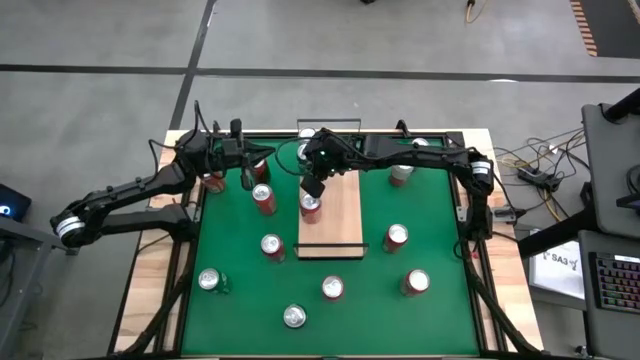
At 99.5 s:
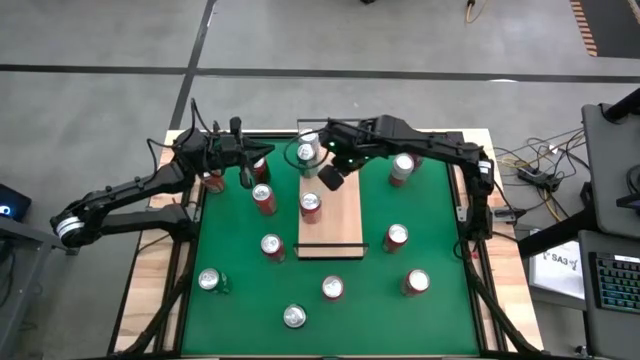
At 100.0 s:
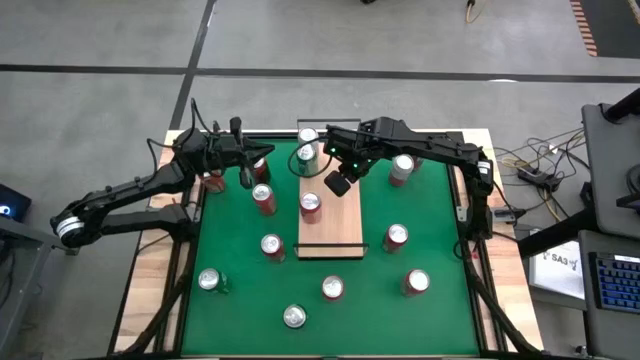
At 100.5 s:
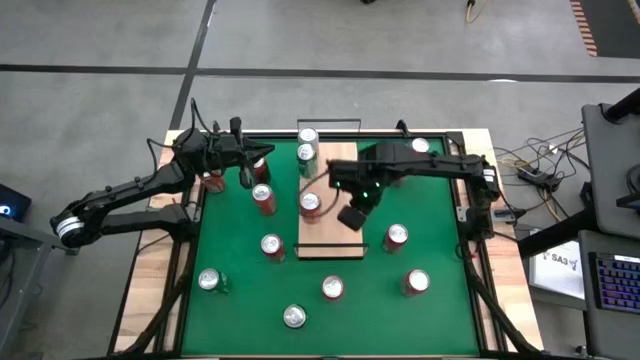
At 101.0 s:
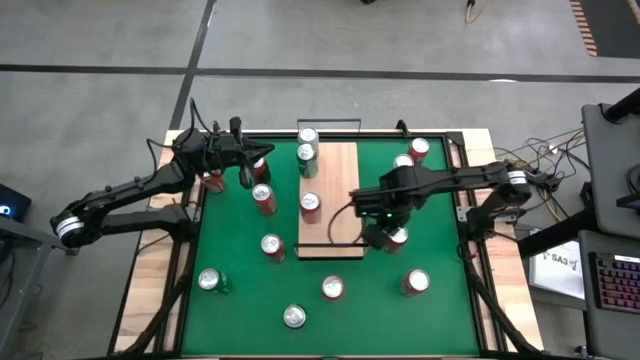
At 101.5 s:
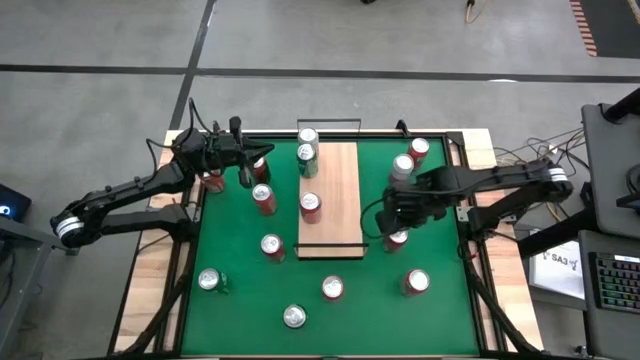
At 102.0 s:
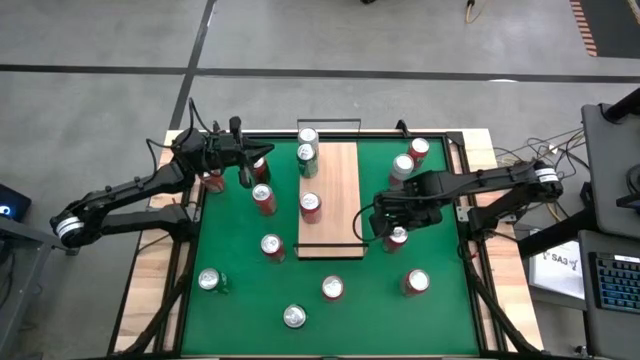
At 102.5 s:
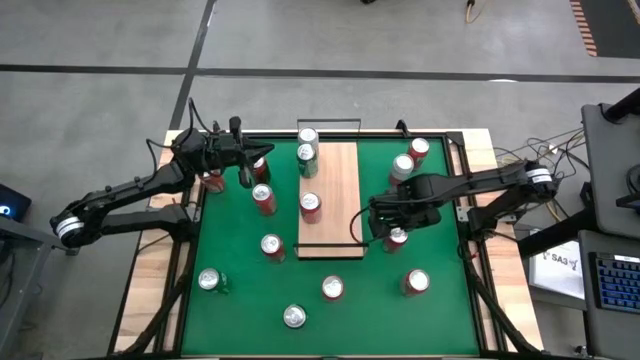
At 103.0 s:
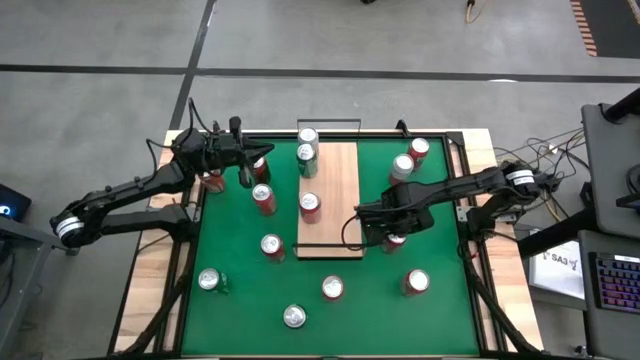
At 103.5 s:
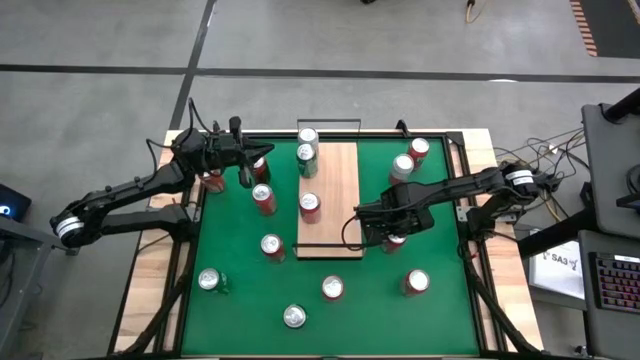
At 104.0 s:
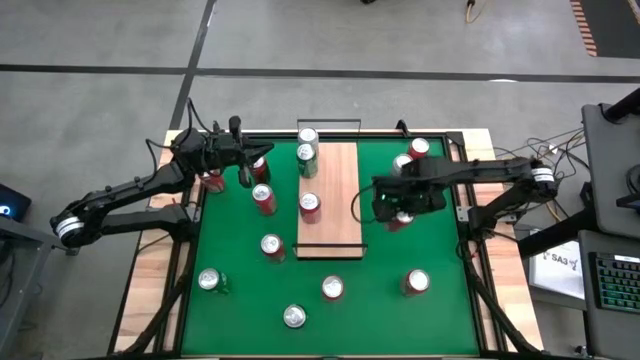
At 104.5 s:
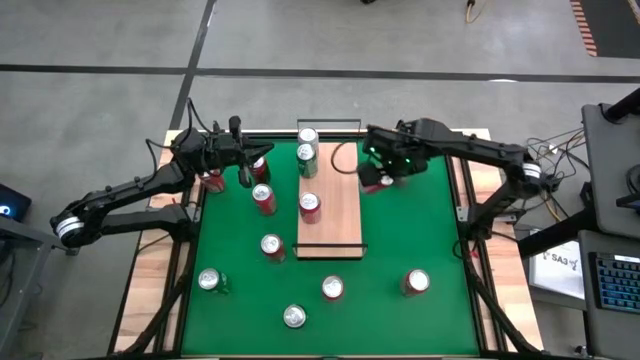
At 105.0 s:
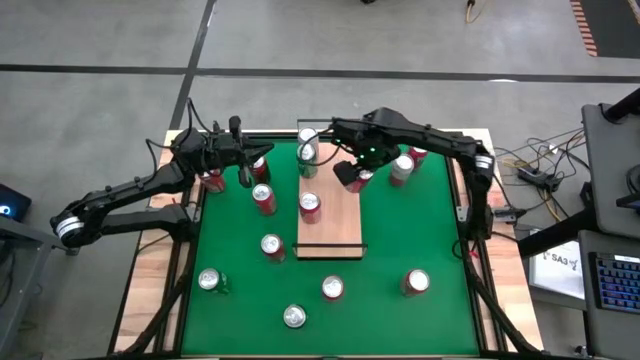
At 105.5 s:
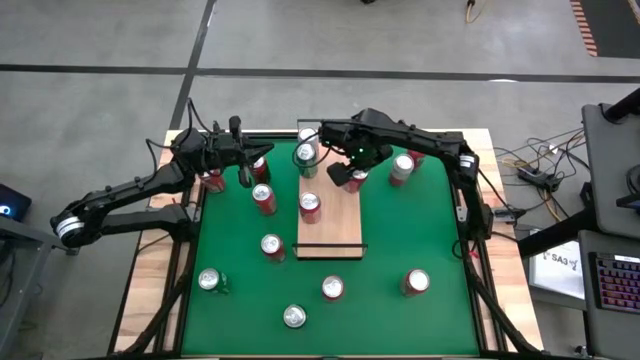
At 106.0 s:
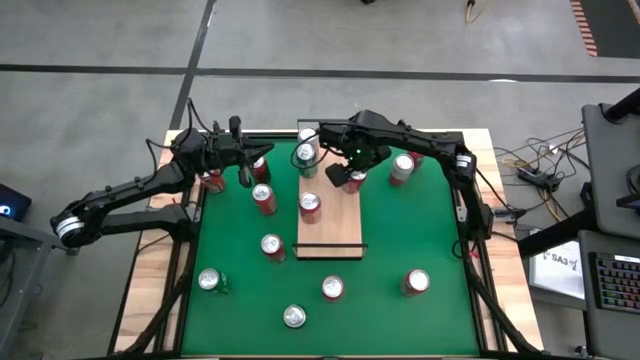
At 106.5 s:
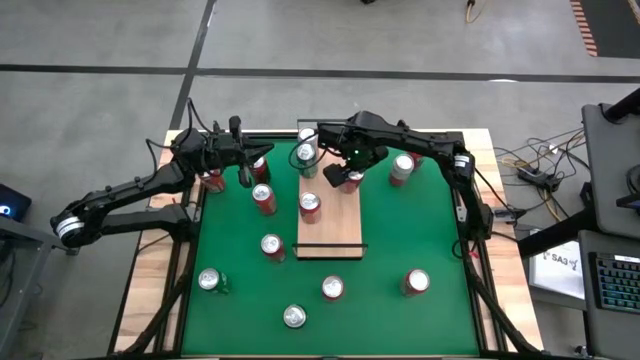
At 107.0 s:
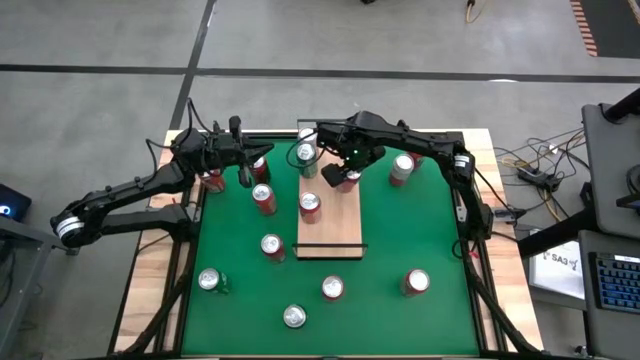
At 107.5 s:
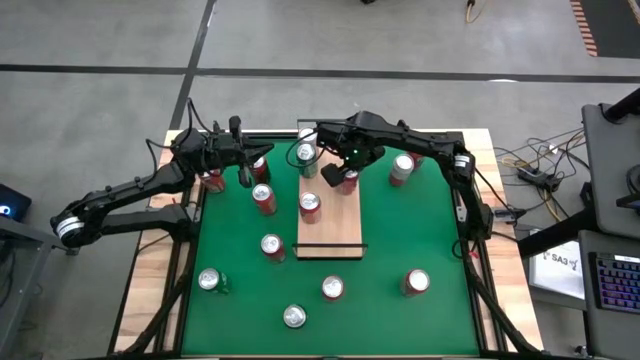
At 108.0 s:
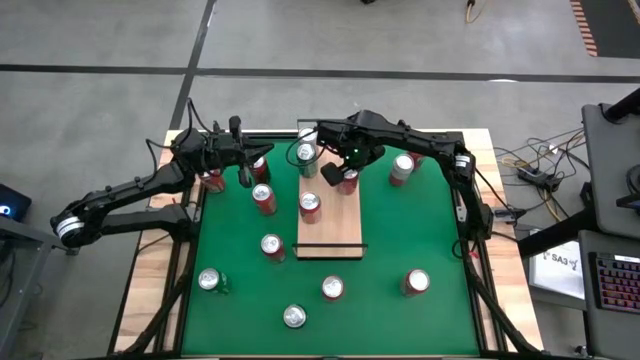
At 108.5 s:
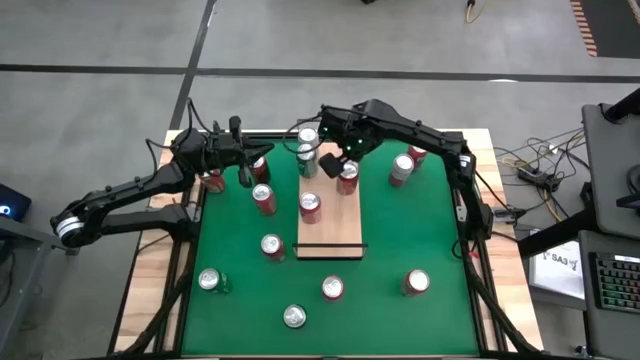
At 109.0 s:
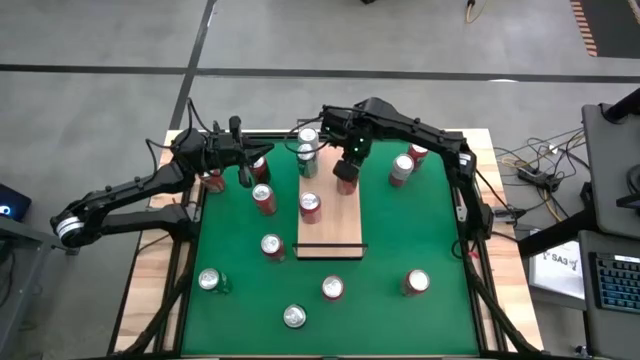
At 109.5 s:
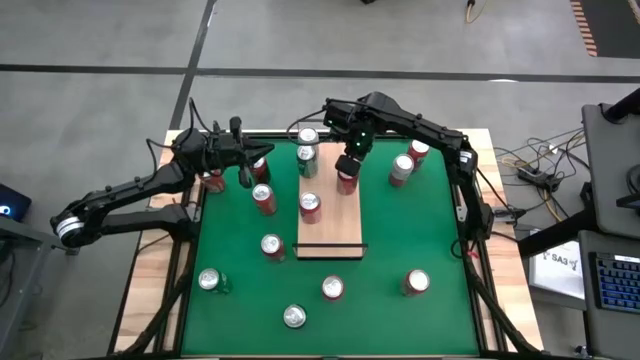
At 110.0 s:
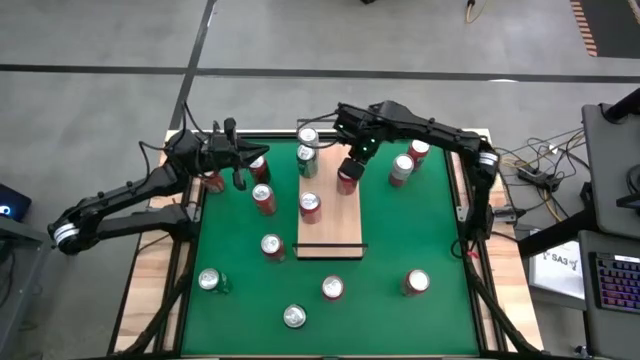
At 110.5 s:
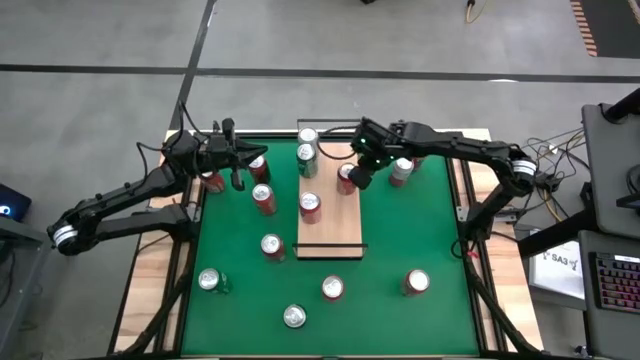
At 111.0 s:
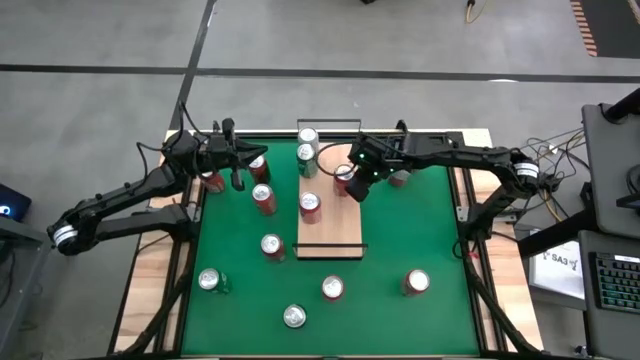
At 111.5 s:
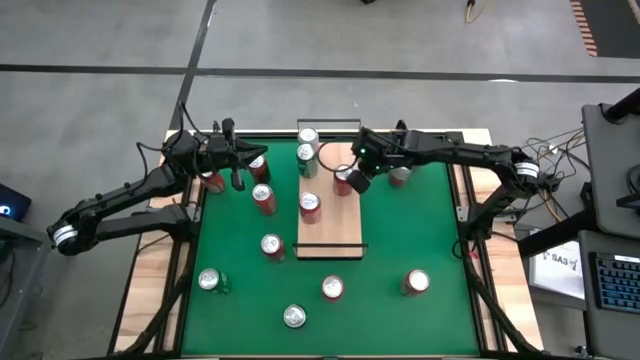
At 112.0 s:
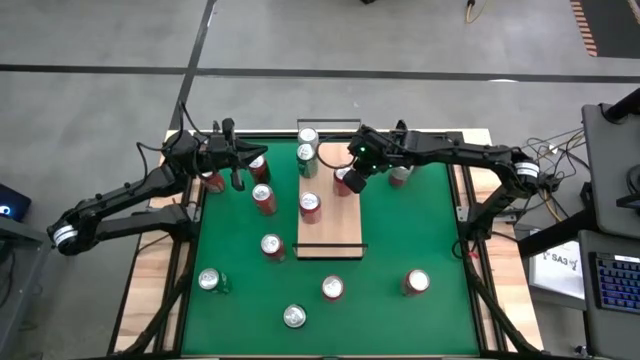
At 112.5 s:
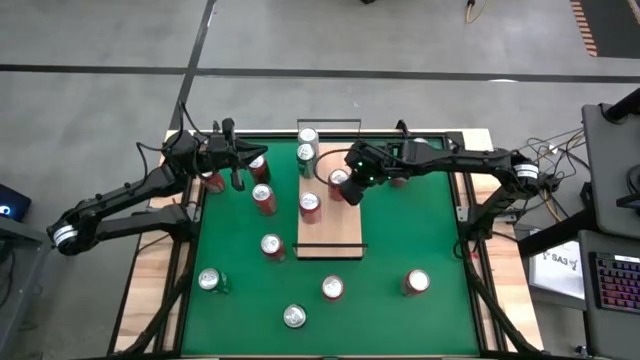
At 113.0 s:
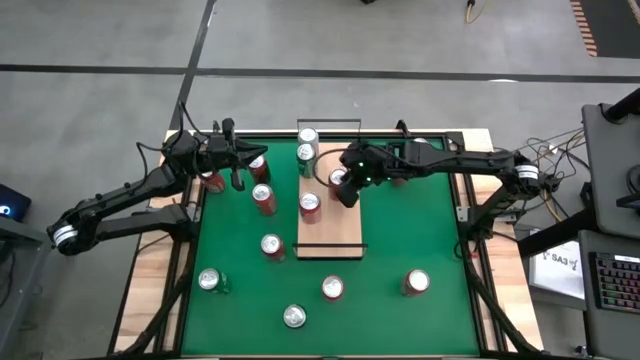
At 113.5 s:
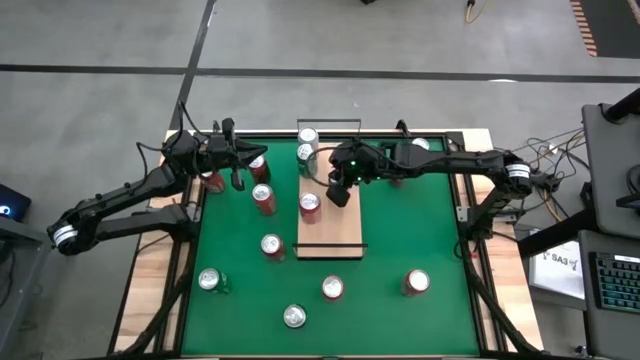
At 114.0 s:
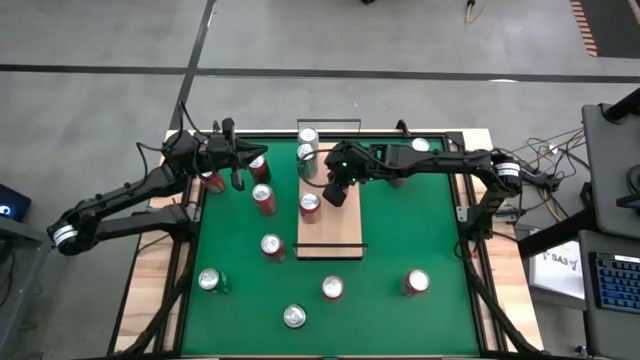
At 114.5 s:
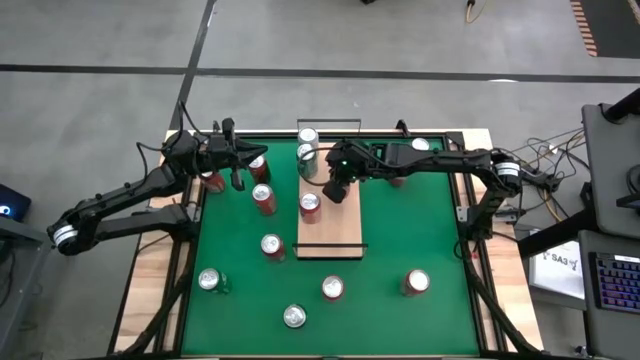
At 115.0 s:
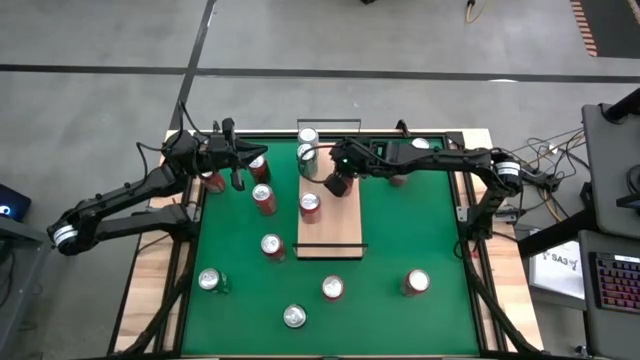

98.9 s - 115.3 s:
Task: Place canned beverage on shelf
Put the right red soda can on the shelf

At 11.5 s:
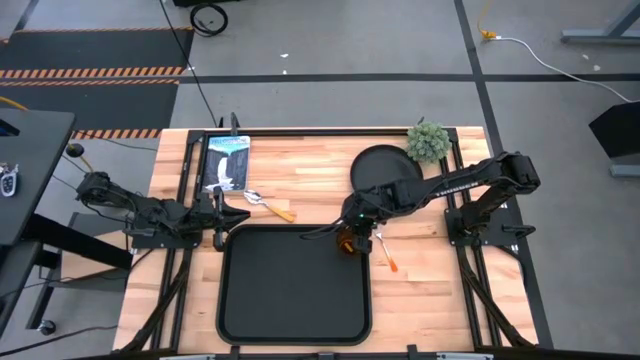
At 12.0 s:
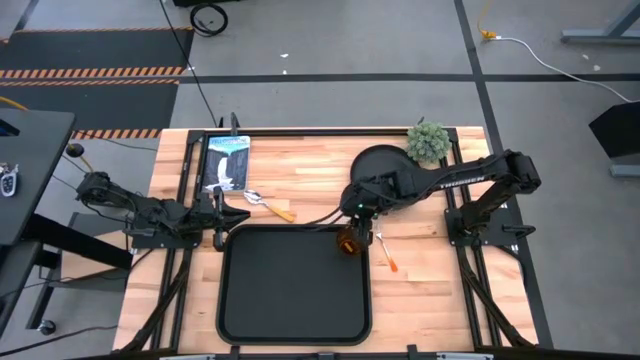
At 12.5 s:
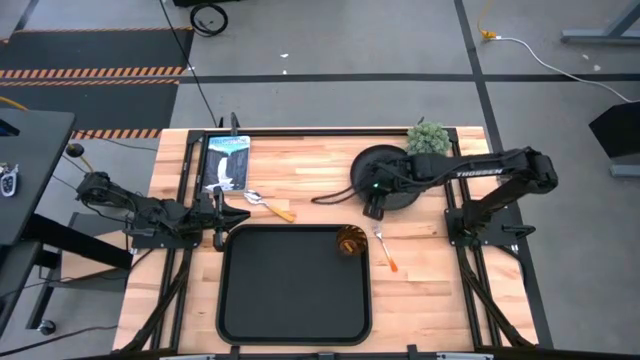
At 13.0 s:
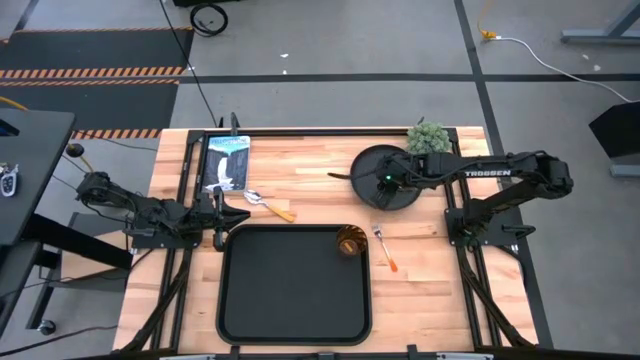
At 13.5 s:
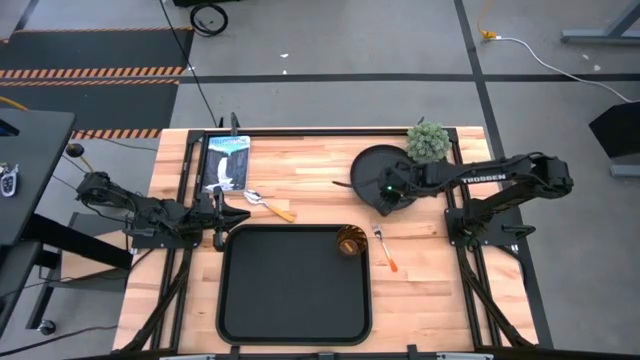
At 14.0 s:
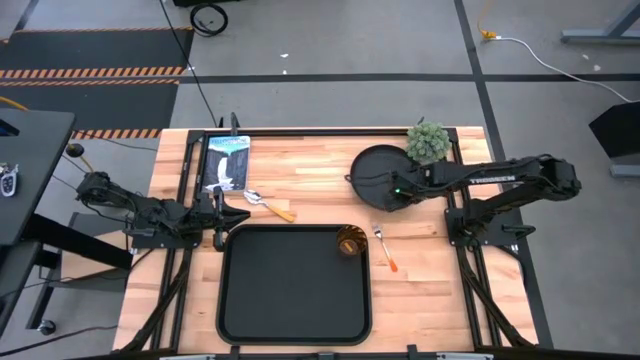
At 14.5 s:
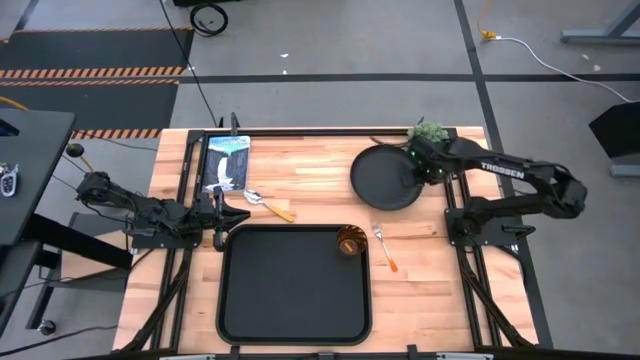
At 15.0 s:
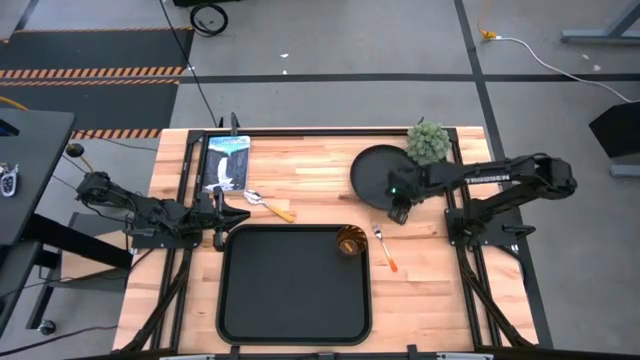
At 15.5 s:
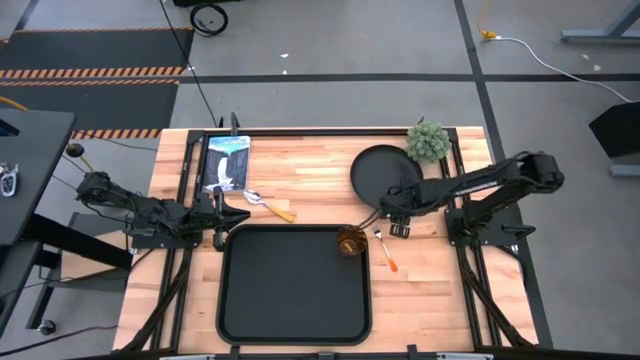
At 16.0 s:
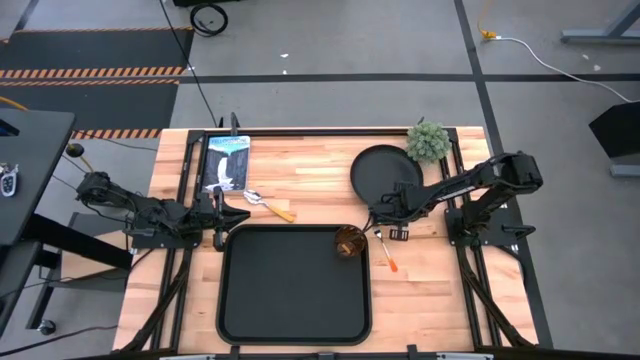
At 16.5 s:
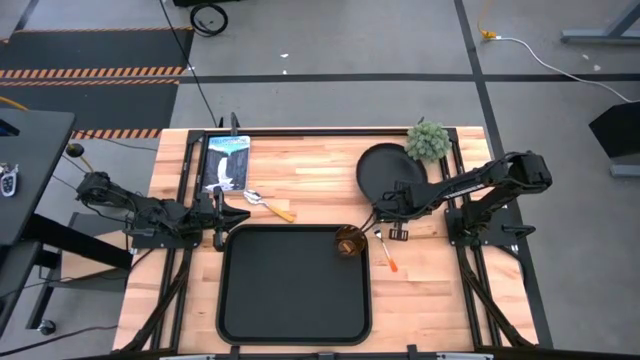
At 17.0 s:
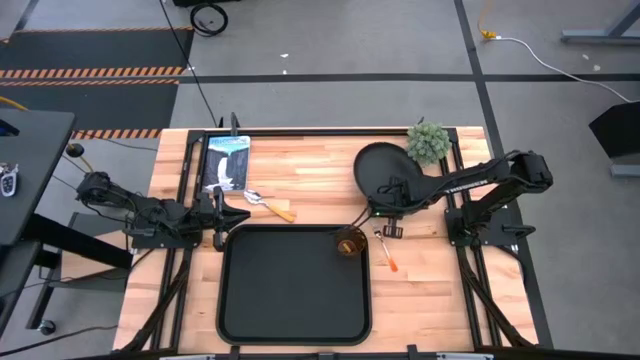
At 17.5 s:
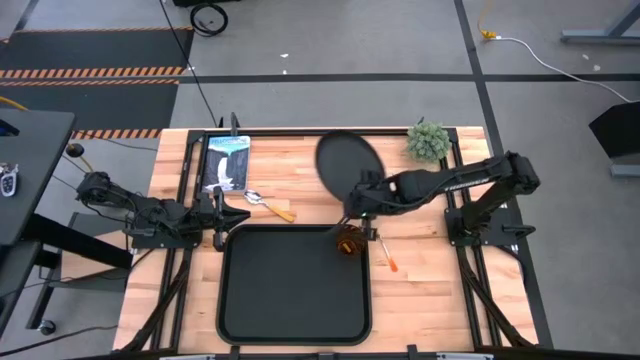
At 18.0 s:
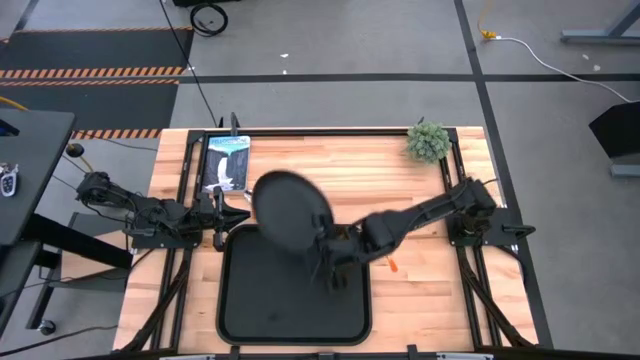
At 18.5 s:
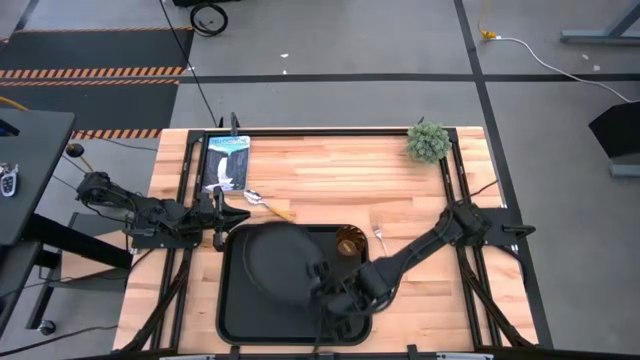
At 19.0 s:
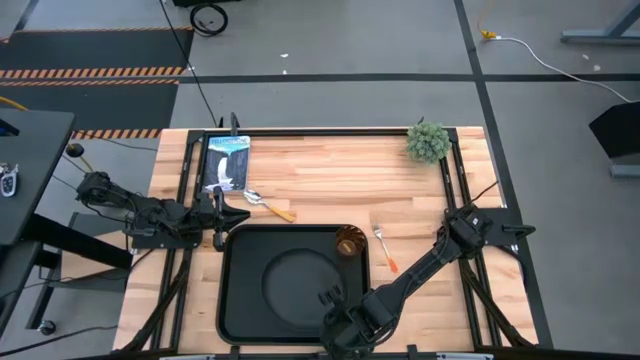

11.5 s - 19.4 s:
Task: Pick and place plate/cup/fork/spoon on tray
Put the black plate on the tray
